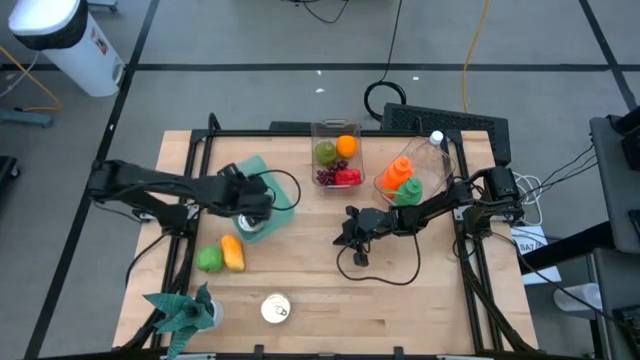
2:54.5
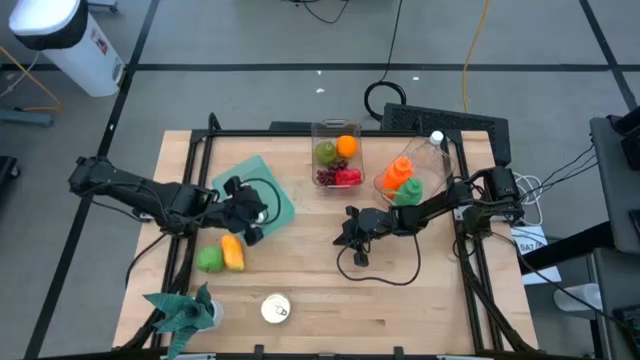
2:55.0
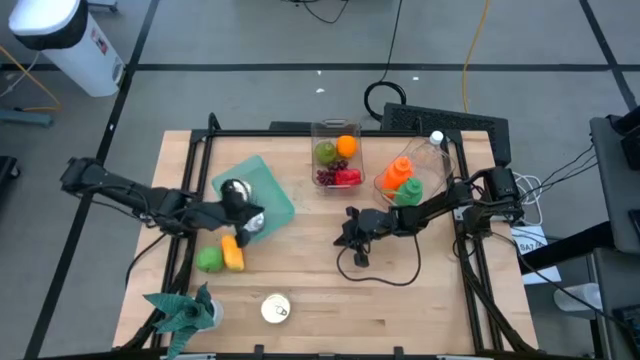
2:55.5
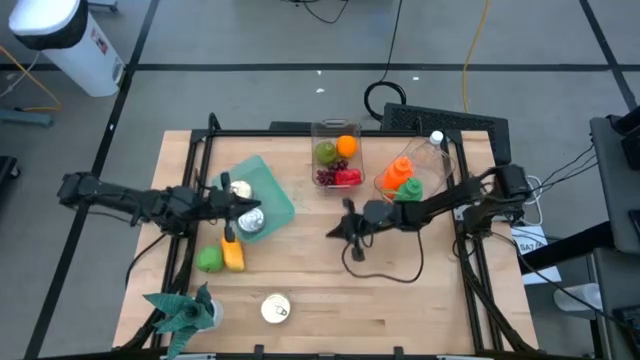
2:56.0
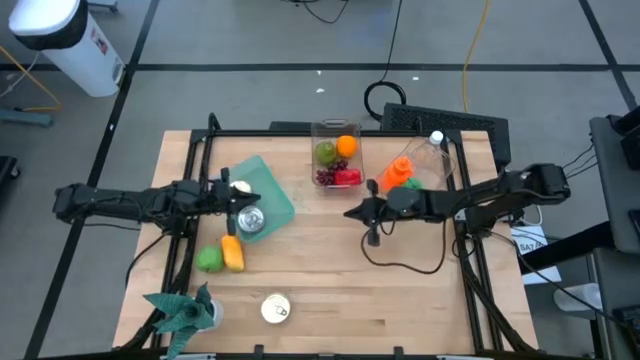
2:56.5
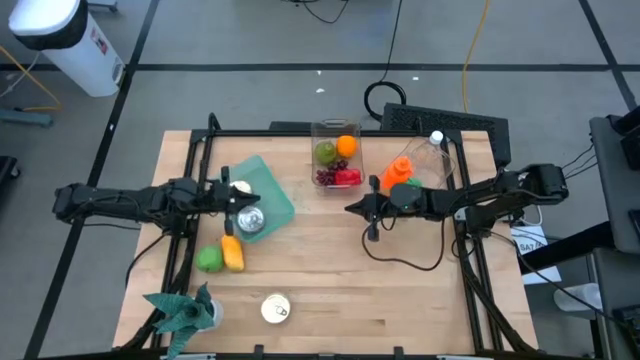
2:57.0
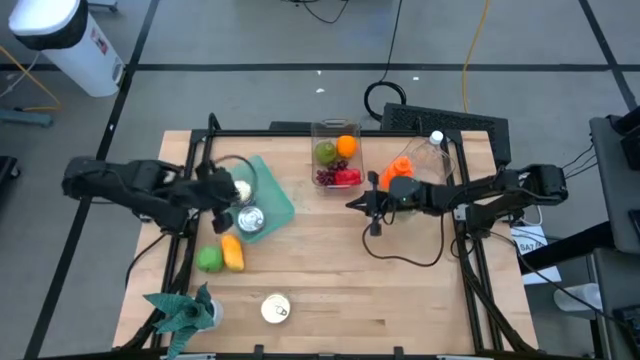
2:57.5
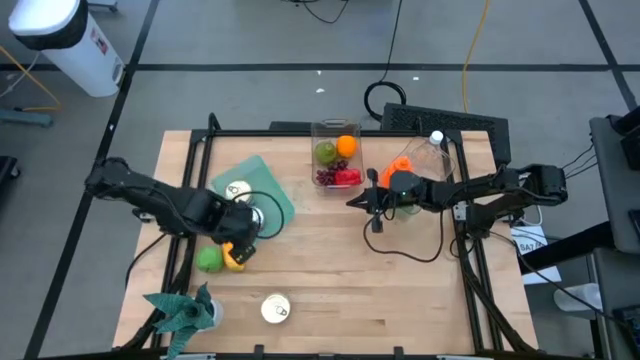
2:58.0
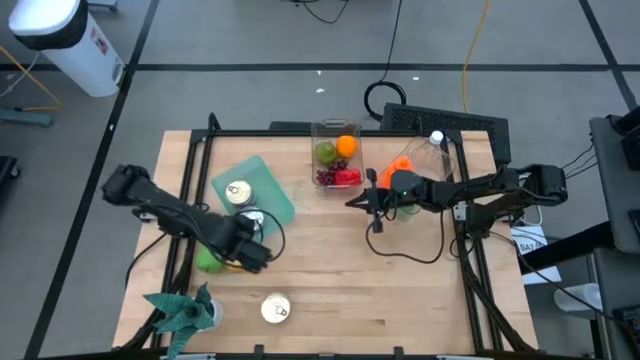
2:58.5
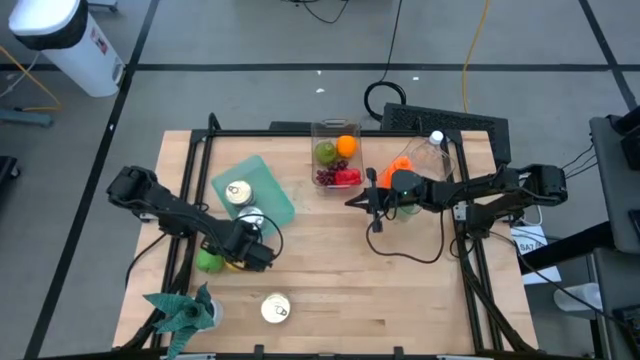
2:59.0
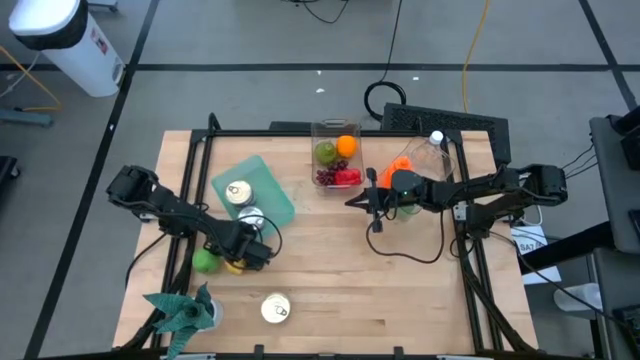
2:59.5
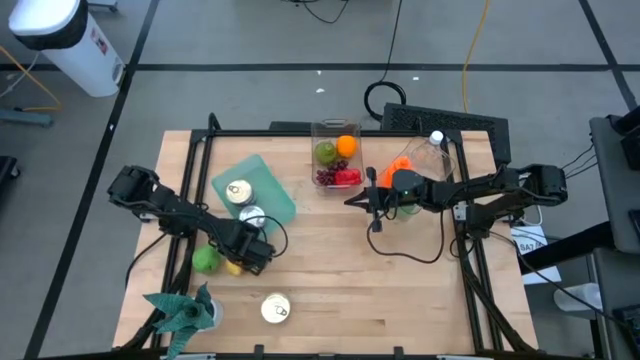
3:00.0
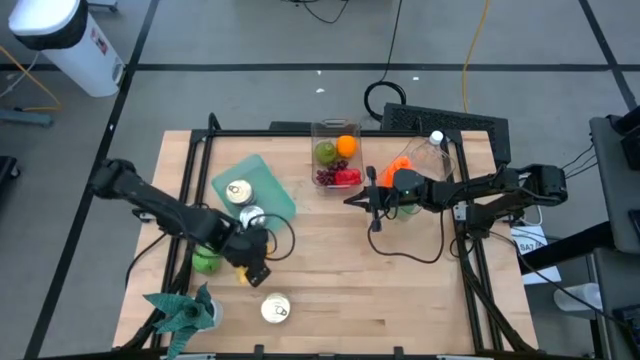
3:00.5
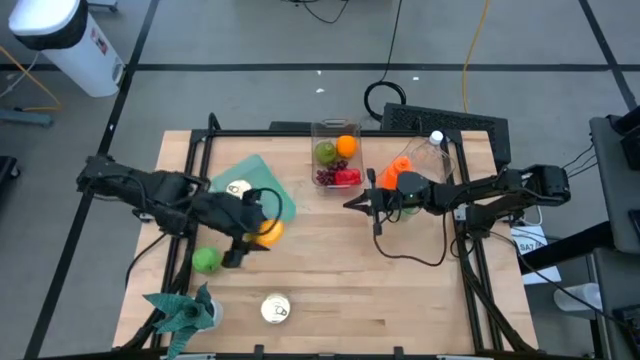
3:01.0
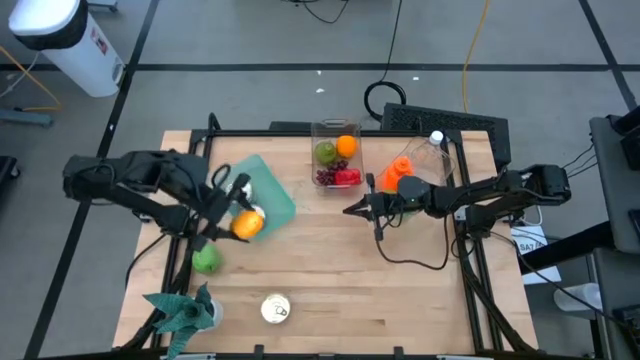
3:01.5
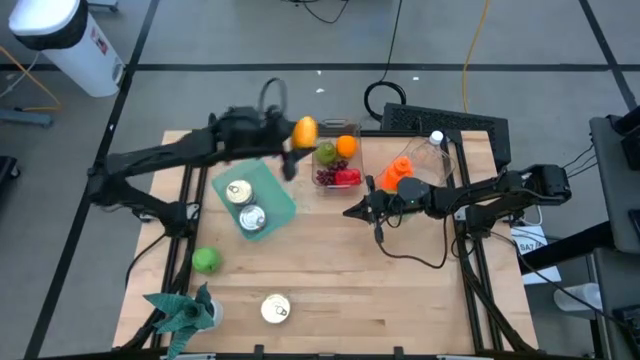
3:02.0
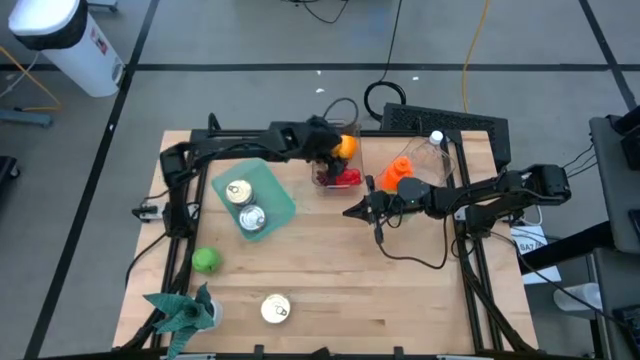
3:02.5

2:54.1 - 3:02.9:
Task: Pick & Place Food Item
Put the yellow mango into the left transparent bin

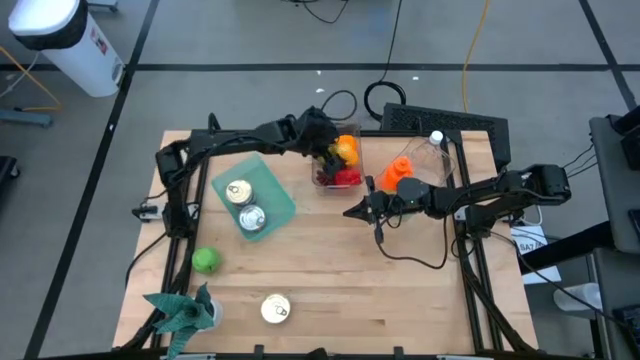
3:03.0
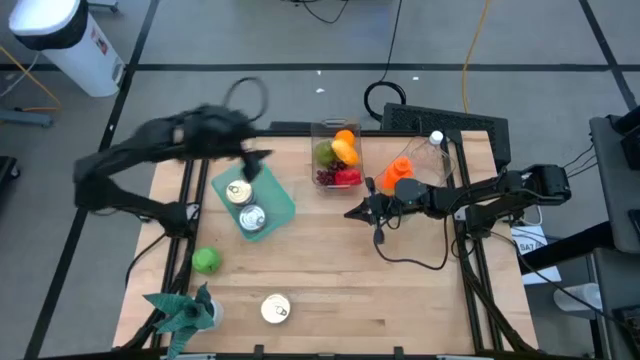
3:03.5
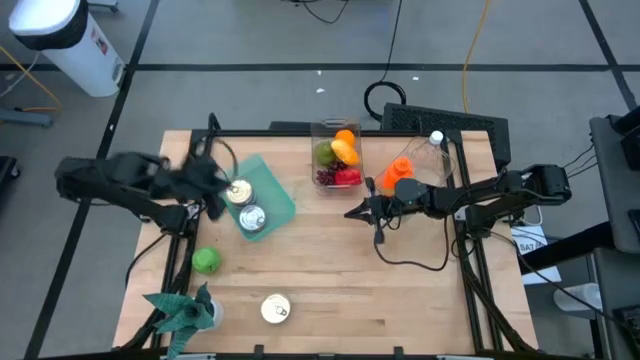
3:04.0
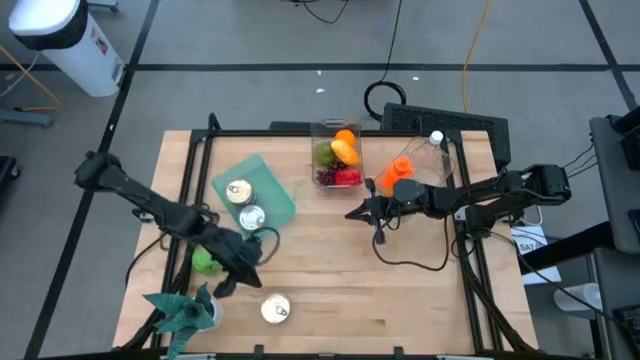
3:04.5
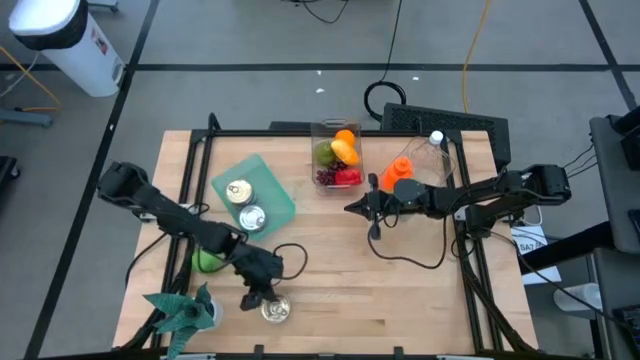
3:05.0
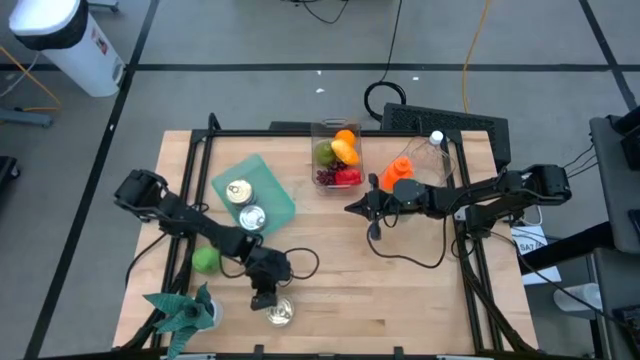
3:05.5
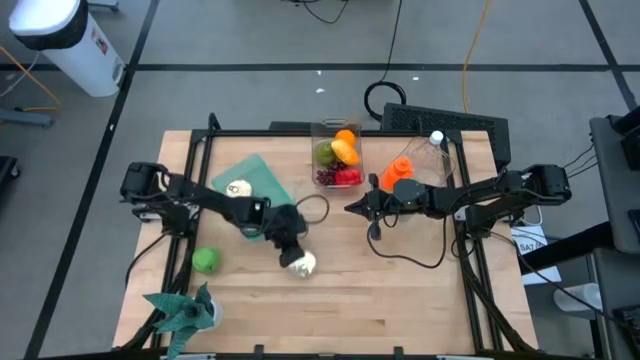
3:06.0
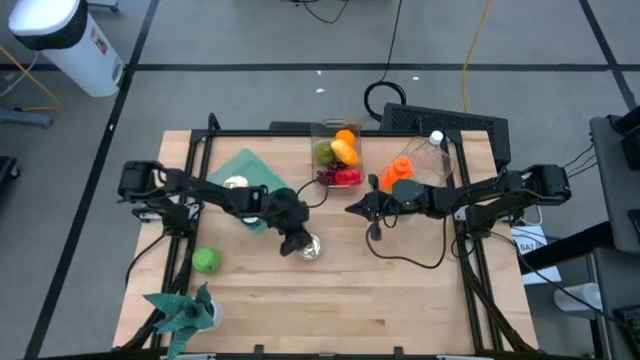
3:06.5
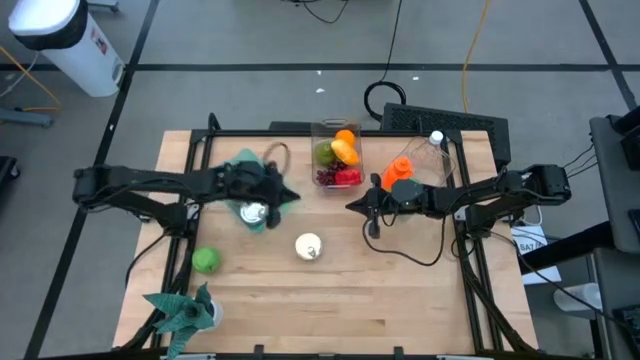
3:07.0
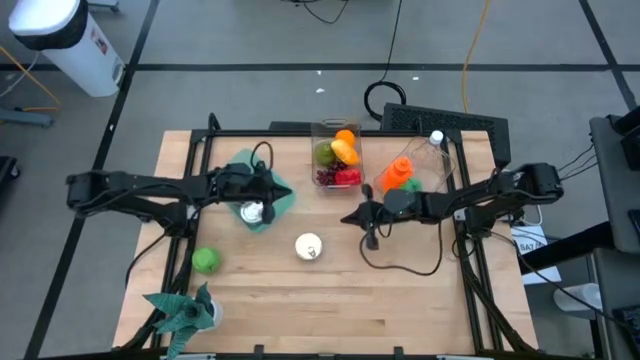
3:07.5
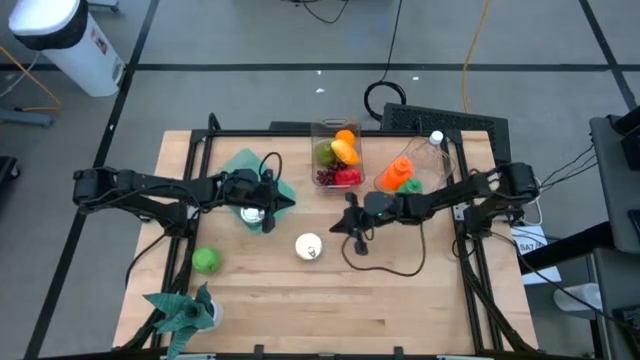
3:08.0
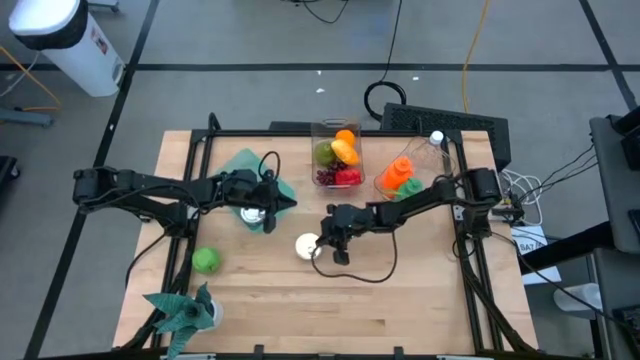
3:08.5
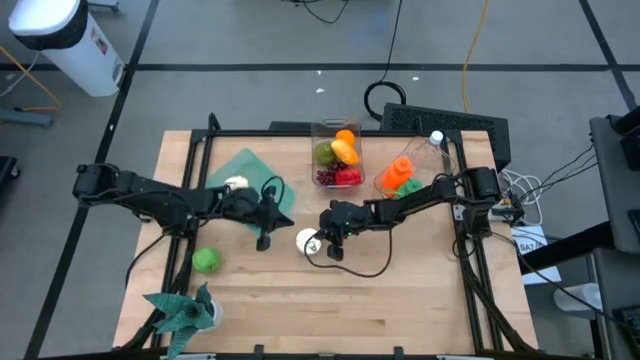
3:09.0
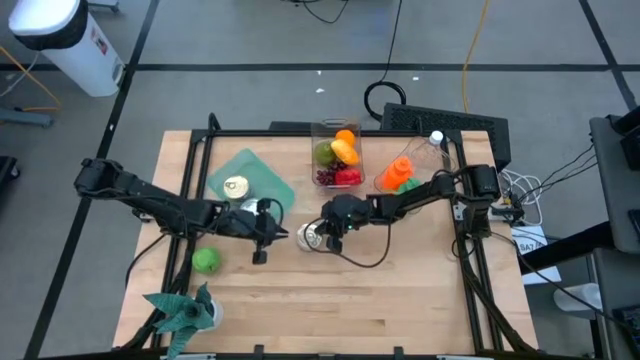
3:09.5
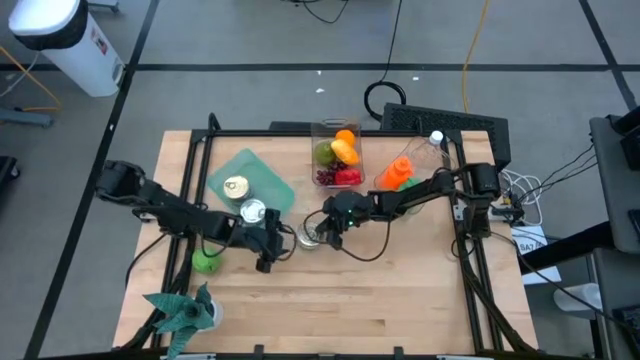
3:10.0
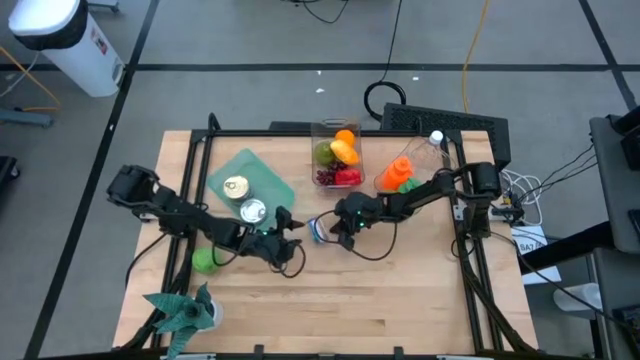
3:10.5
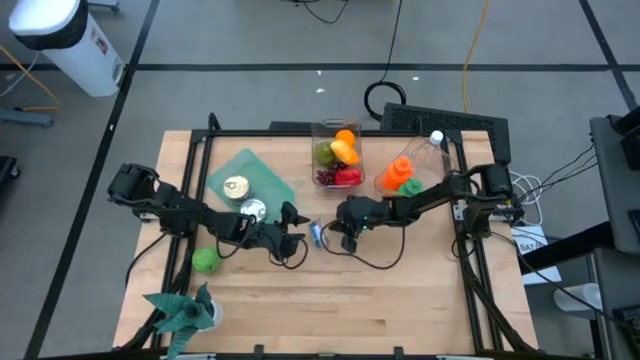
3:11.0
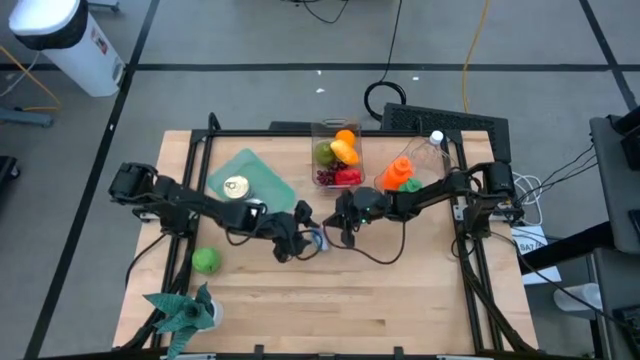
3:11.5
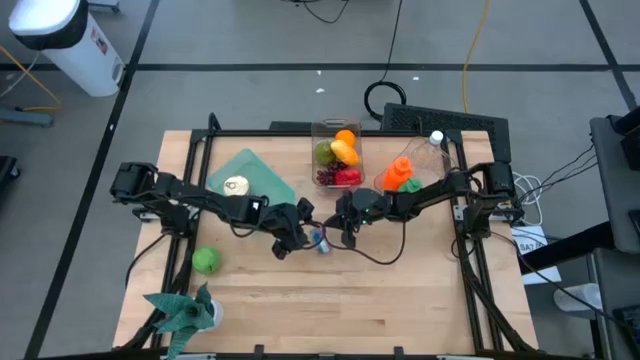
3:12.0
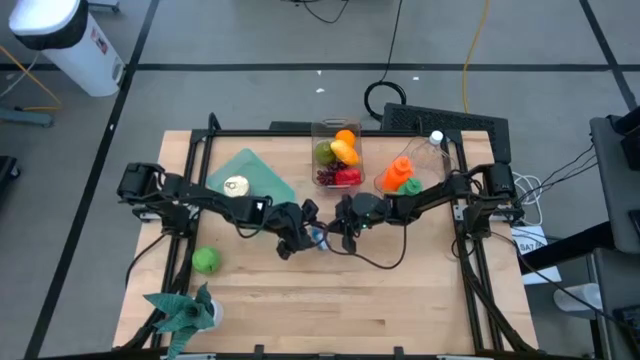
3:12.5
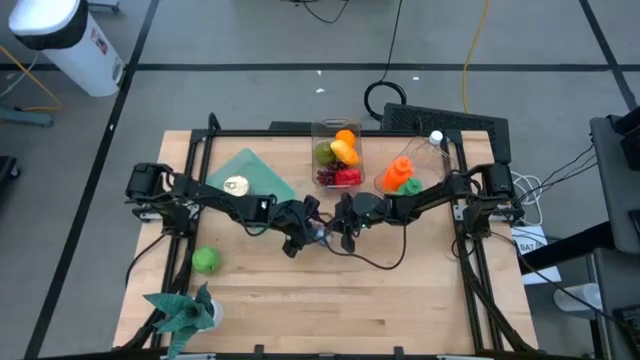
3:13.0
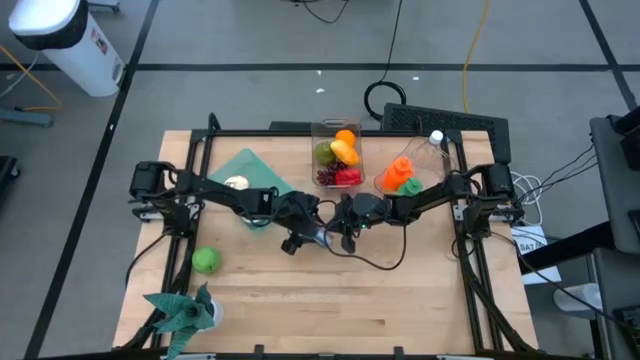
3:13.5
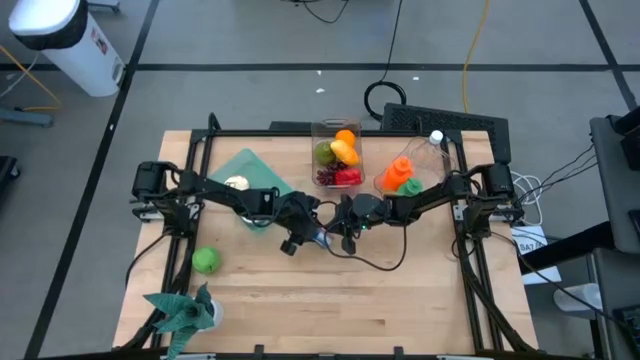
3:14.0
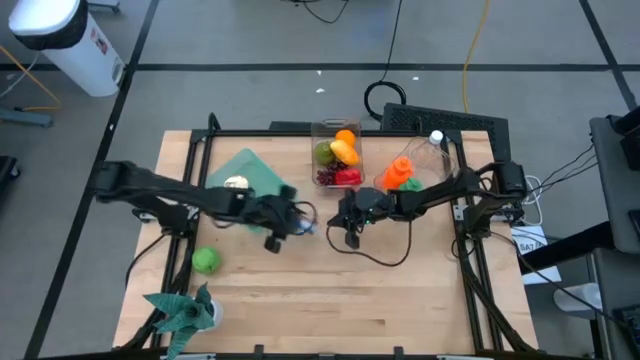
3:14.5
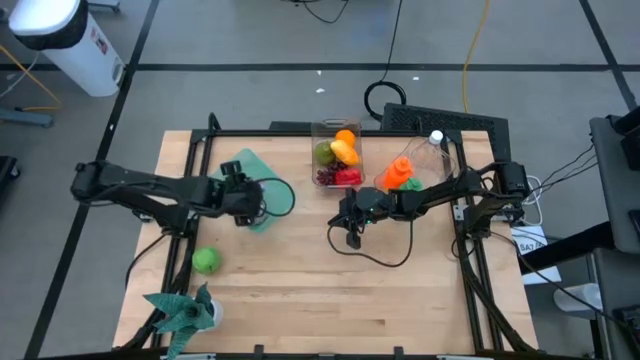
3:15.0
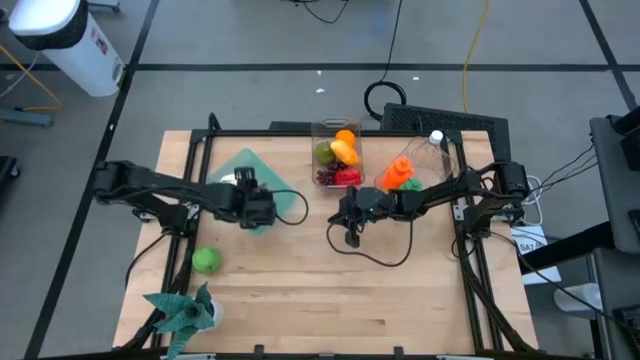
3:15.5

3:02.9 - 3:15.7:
Put the blue pink tuna can into the green bin
